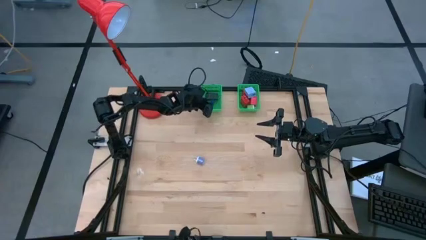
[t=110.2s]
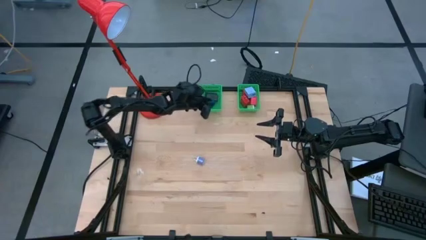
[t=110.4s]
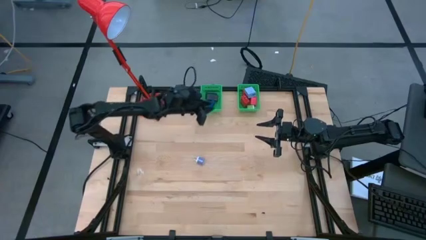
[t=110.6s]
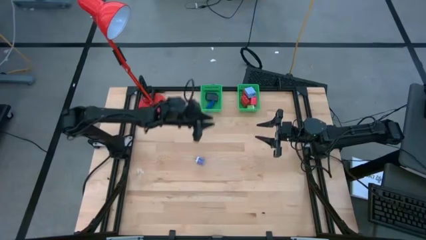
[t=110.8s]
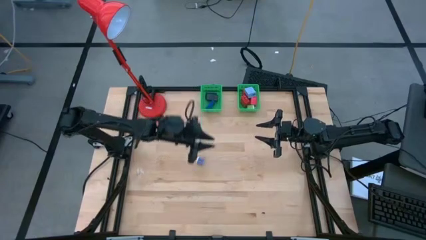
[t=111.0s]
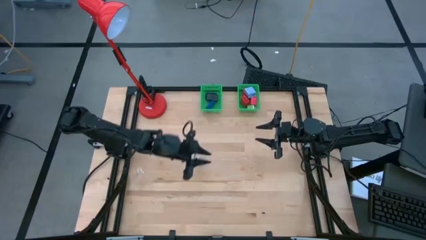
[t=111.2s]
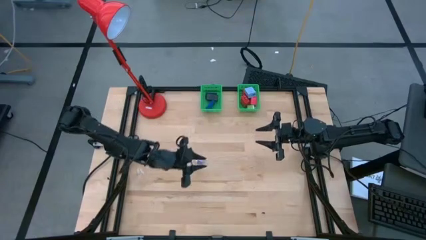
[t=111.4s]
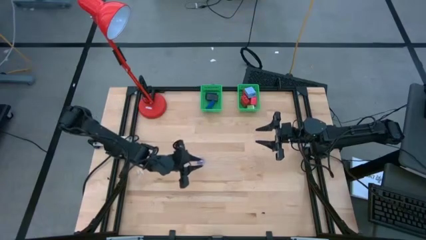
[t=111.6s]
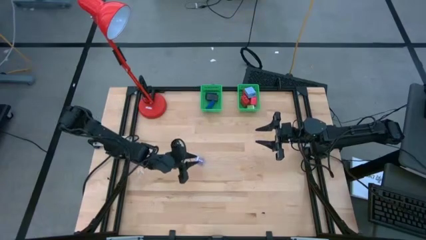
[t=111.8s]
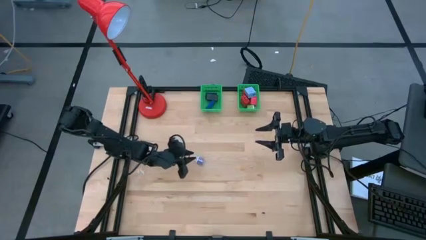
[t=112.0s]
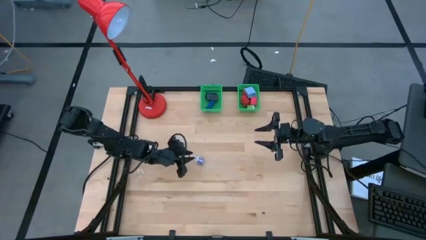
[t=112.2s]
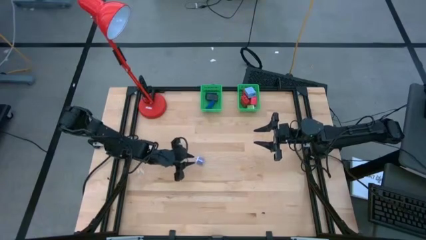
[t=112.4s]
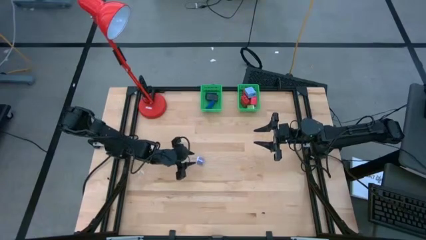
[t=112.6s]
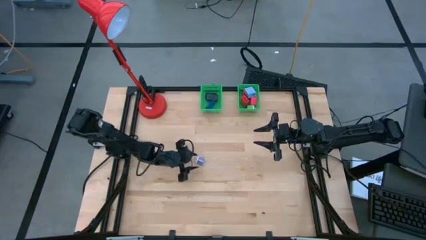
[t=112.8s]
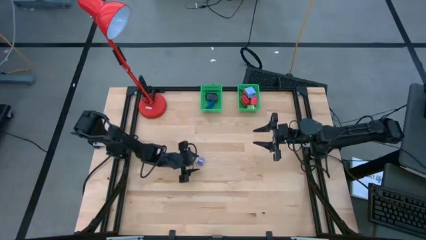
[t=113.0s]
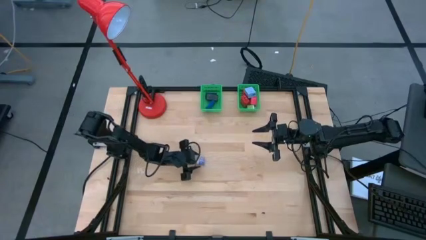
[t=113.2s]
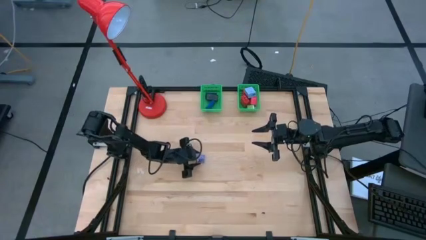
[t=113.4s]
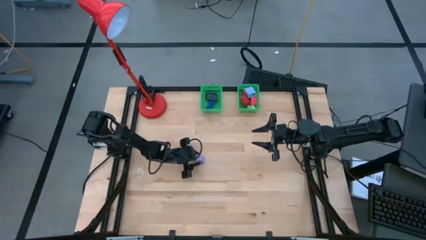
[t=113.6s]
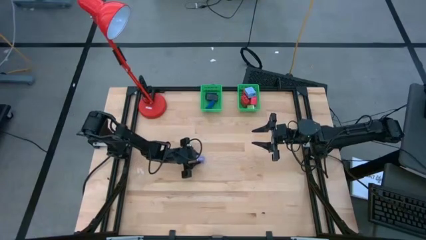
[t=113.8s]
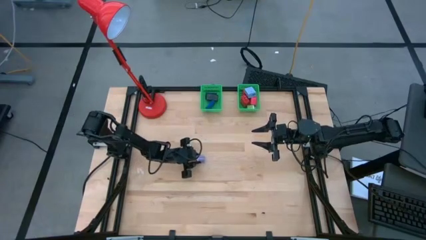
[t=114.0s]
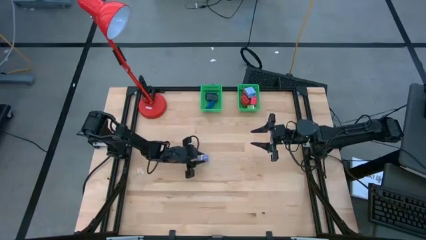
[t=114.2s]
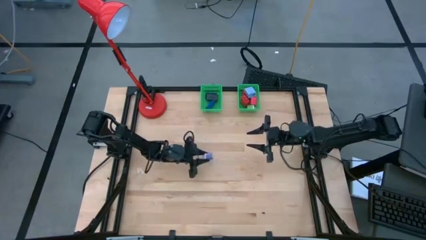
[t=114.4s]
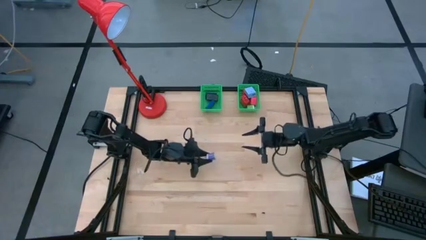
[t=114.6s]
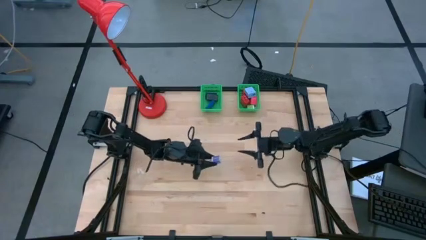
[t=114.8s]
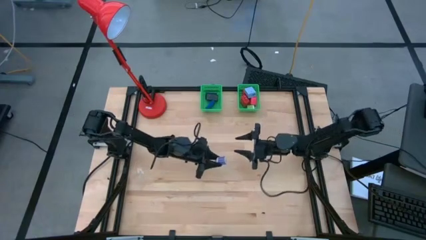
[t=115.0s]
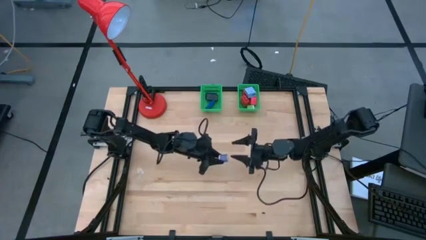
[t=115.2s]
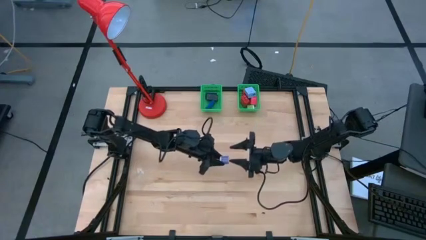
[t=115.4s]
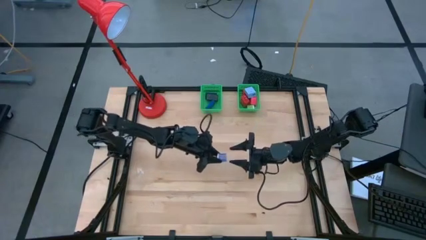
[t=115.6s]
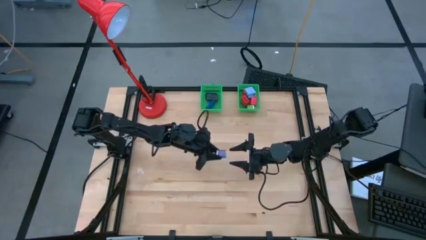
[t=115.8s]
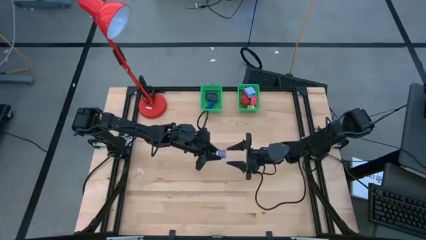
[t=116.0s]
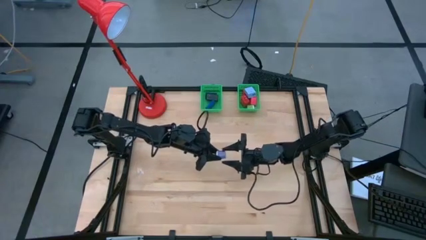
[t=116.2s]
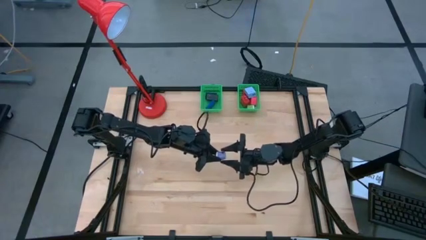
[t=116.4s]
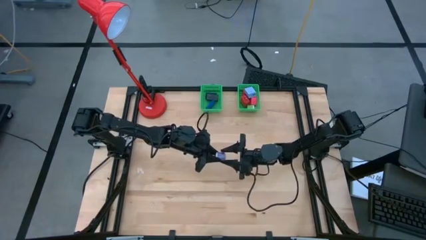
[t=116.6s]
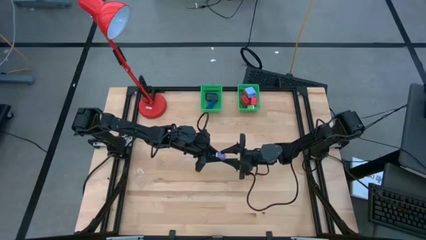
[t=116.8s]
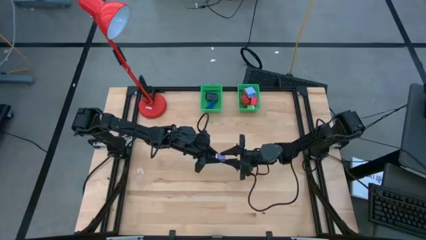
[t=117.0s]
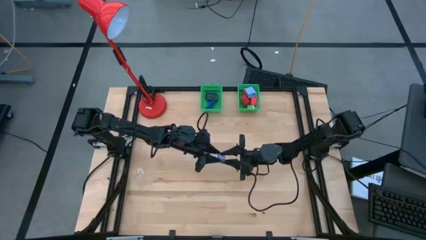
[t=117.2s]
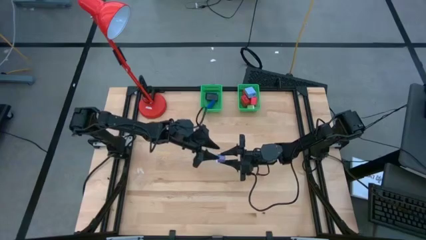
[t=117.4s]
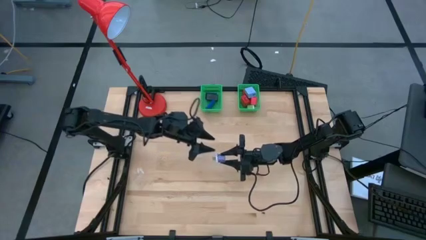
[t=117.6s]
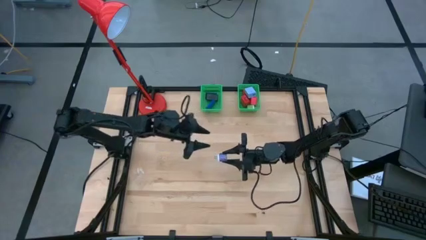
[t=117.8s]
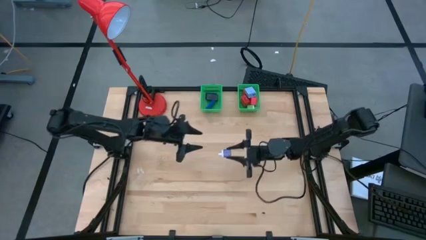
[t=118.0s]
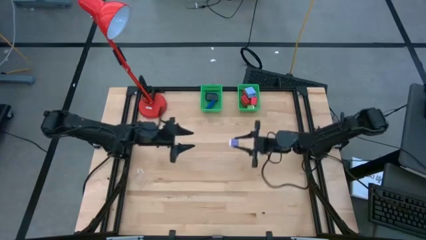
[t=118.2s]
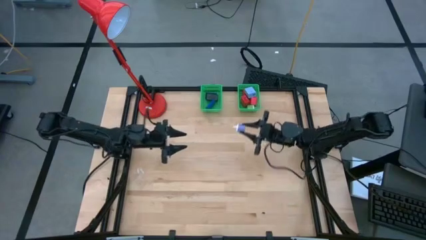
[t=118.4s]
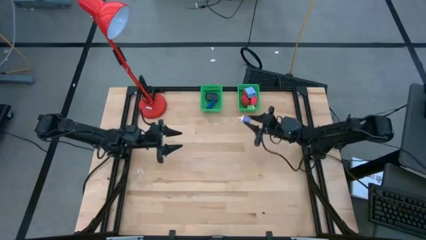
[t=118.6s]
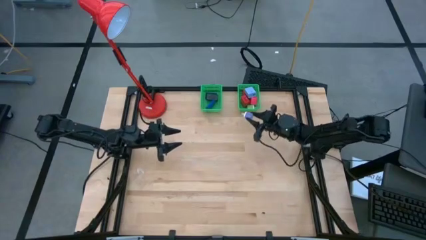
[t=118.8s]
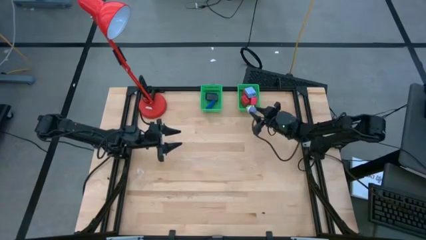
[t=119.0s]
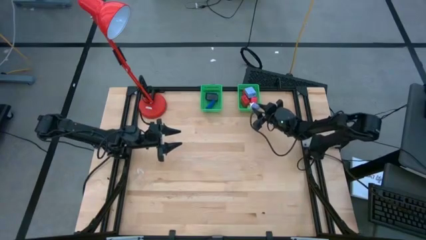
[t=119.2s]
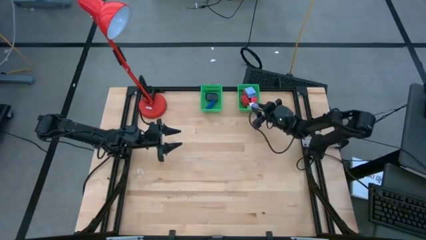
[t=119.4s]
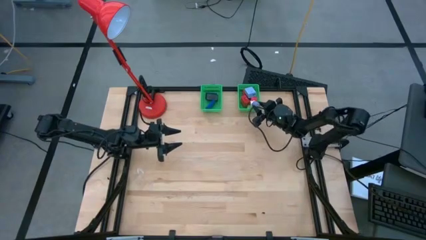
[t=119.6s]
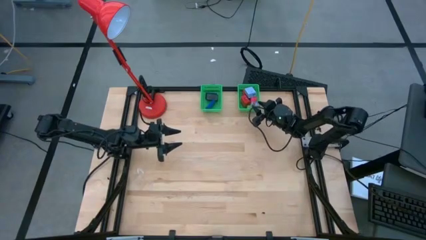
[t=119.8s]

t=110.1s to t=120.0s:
Task: Pick & Place Office items
Put the purple charger adapter into the right green basket

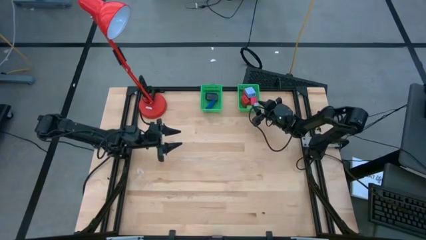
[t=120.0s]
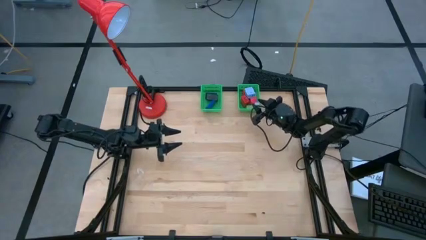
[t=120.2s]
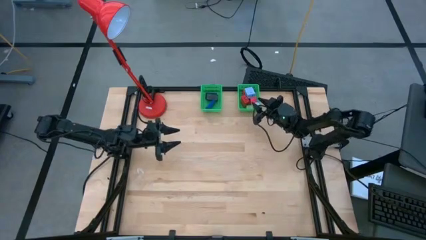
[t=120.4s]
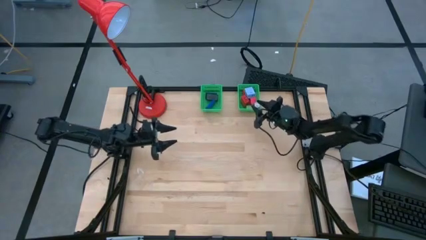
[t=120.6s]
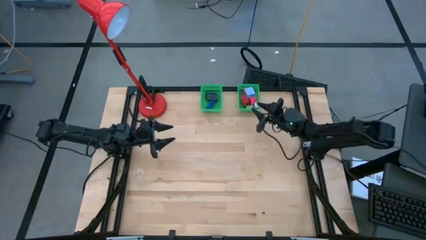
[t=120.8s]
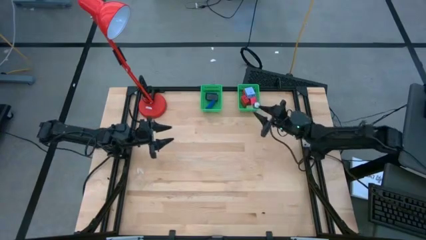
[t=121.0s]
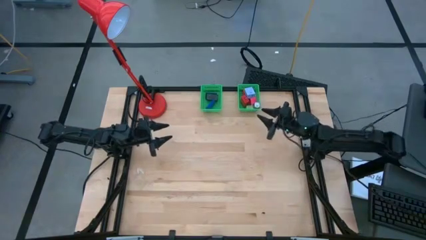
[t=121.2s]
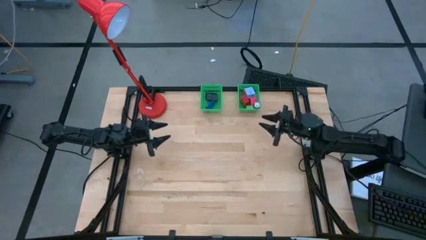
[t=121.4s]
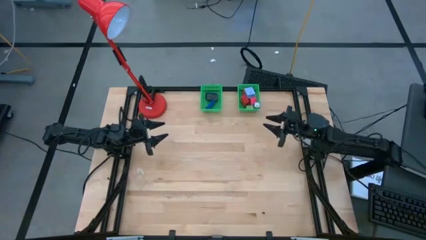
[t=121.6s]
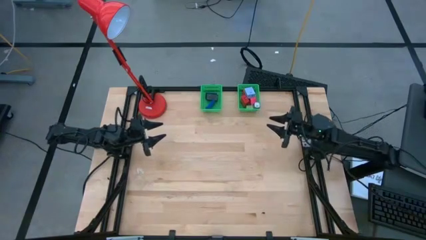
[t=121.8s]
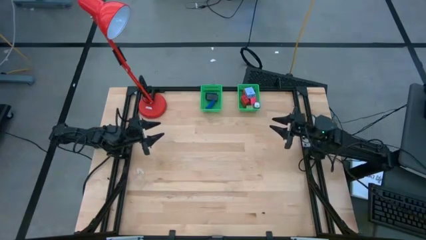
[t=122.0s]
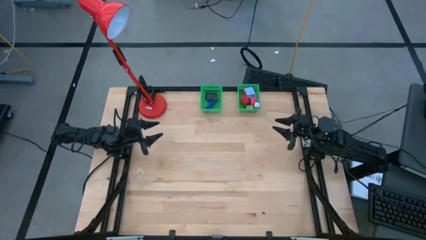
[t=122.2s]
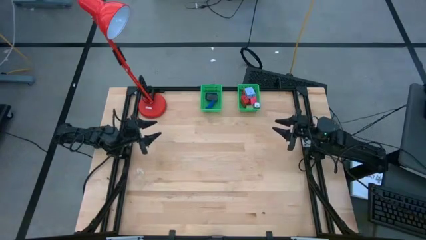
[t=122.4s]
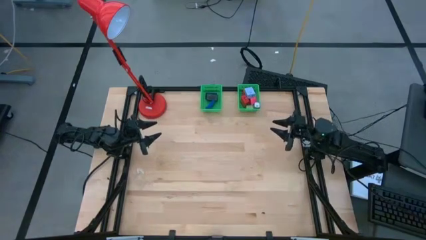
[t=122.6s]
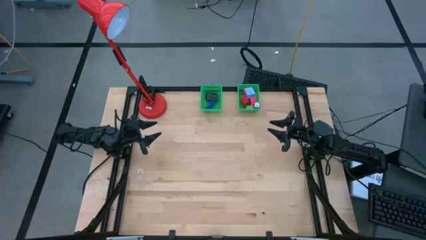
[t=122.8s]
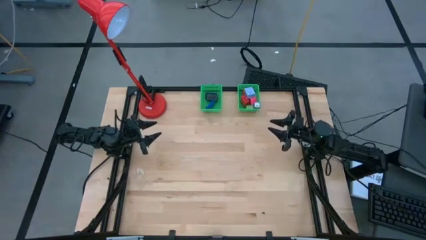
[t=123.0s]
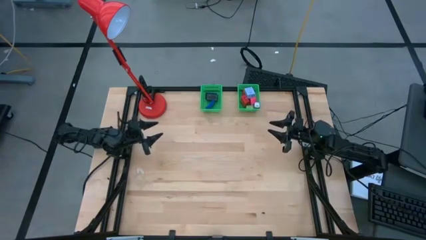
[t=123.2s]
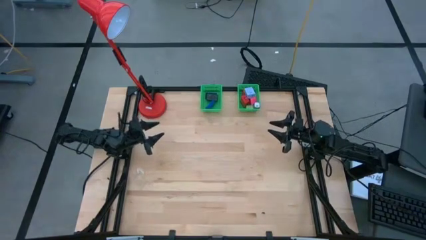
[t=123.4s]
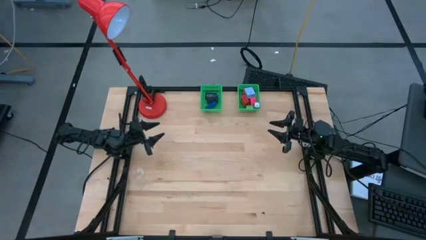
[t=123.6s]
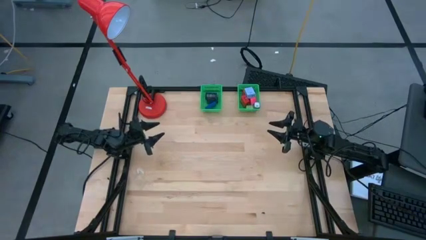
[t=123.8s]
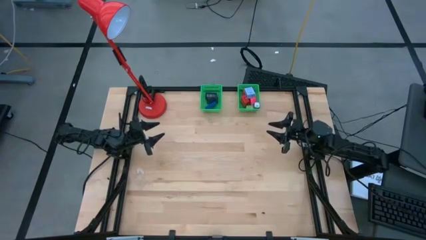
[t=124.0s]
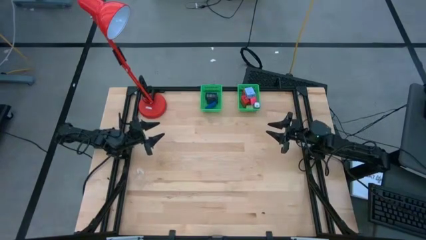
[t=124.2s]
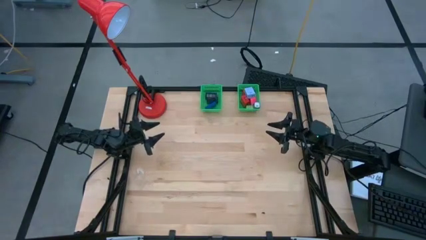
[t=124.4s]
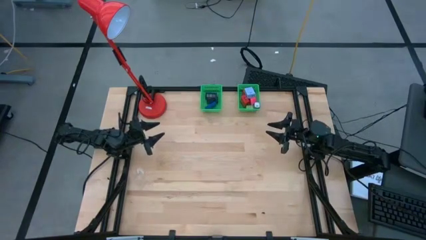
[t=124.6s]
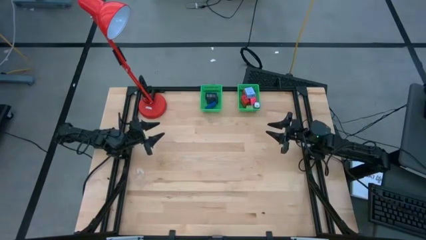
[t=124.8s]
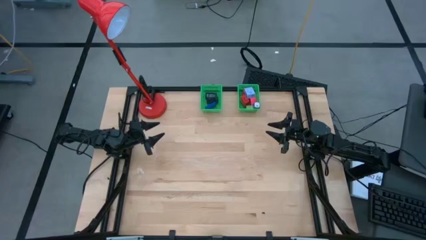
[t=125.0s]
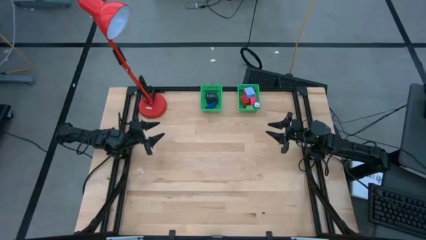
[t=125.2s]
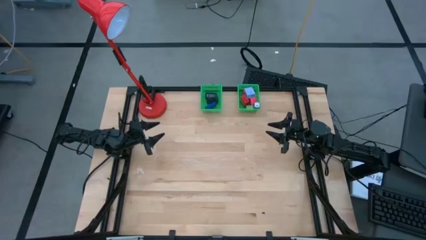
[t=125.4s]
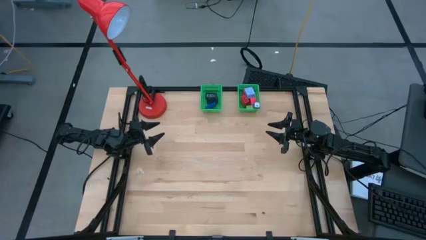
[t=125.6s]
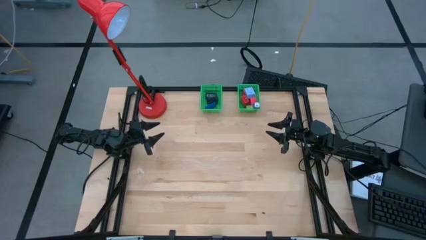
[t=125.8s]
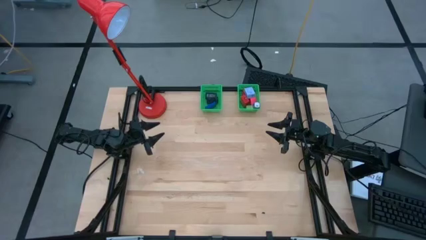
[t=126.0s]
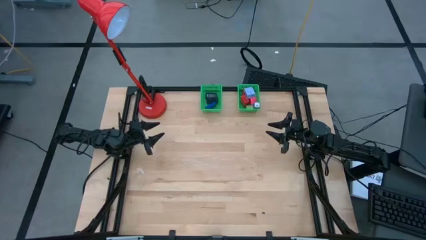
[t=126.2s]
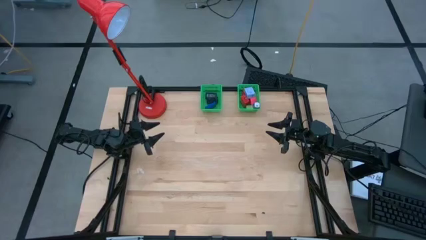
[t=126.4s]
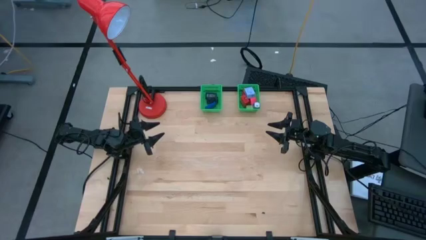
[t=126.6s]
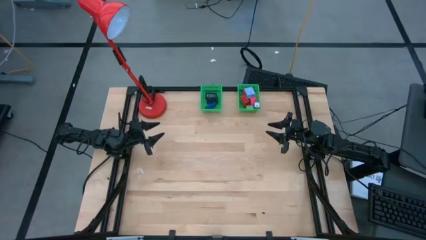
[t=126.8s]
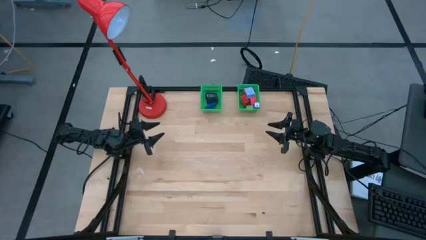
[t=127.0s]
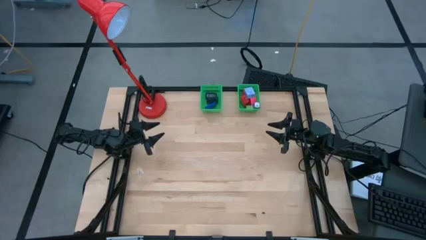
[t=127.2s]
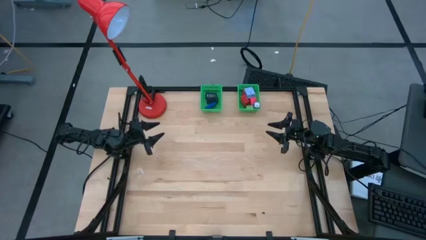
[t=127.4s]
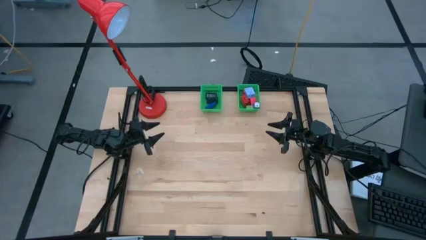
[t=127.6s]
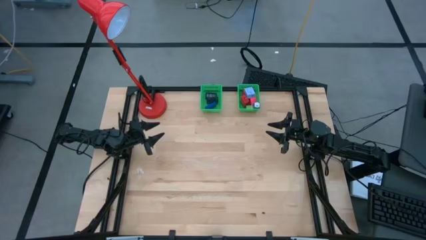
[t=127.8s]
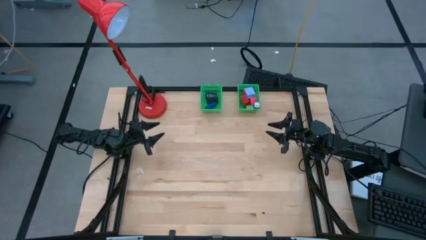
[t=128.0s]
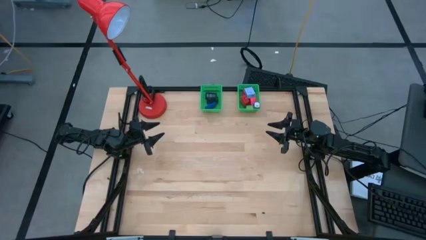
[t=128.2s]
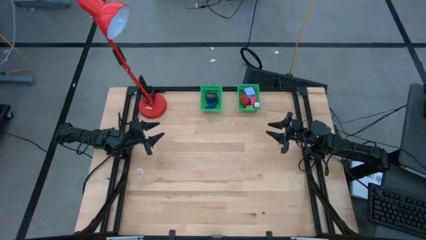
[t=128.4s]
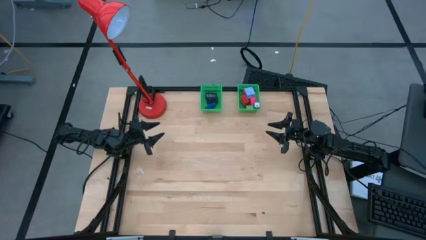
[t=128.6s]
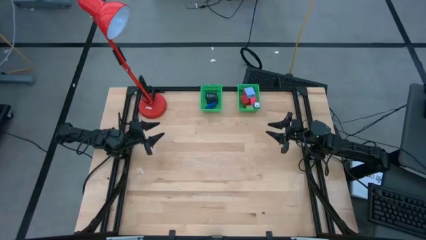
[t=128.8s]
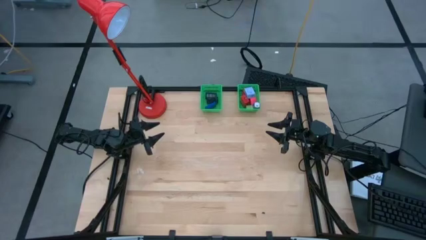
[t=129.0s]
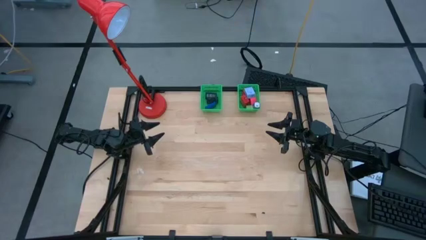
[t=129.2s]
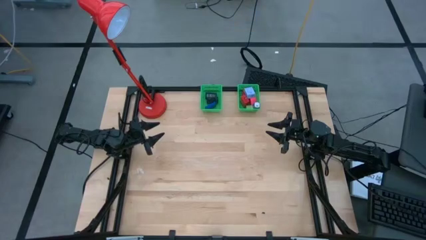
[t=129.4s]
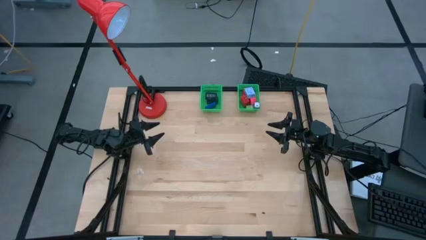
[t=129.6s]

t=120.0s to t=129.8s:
Return to home position
